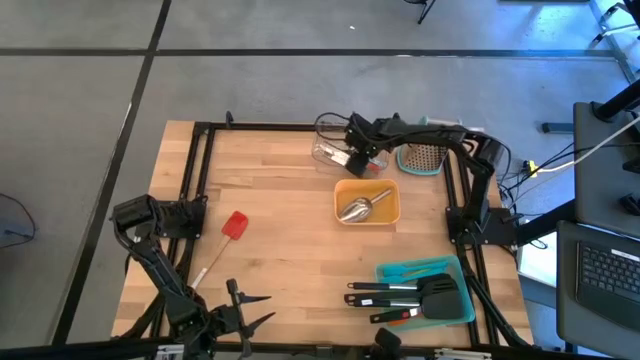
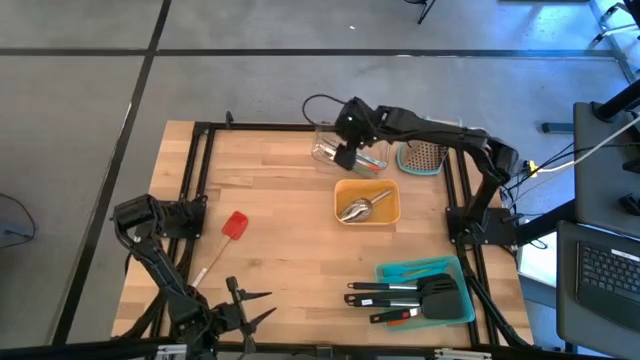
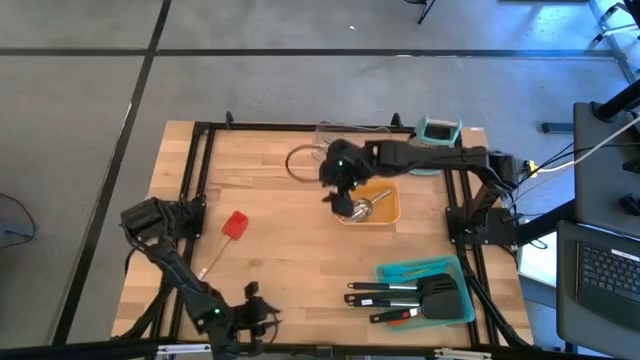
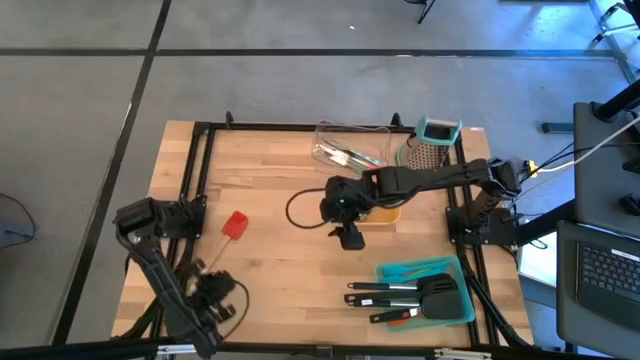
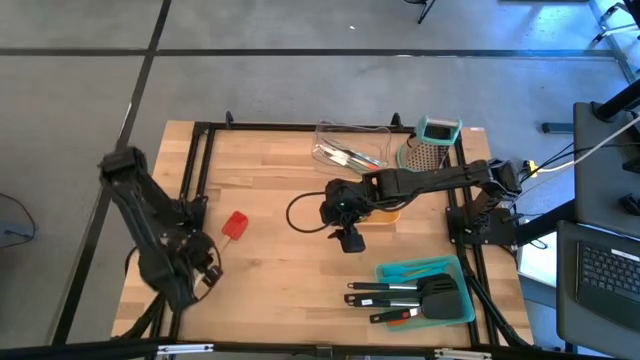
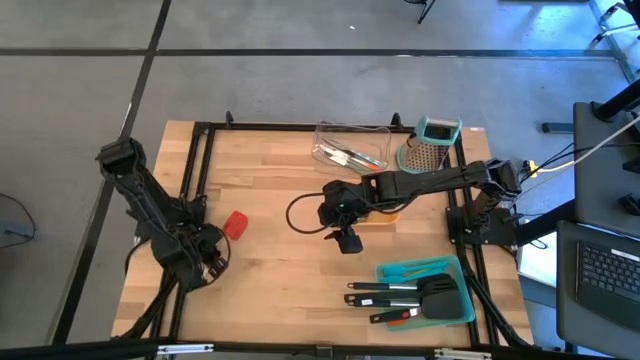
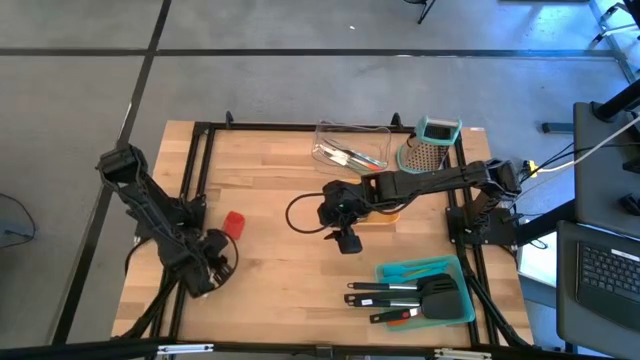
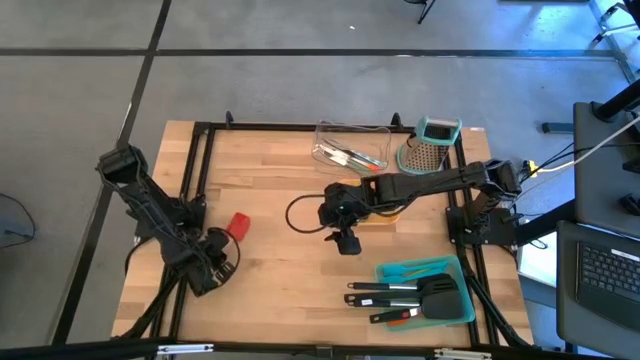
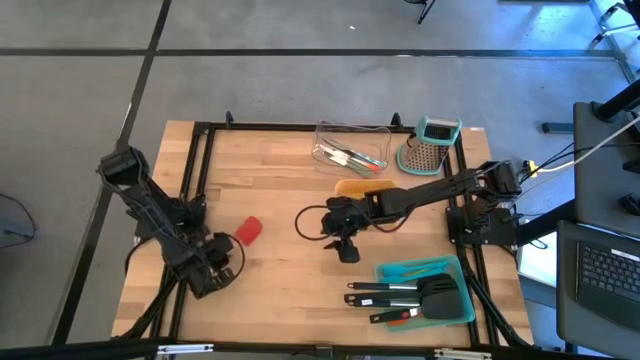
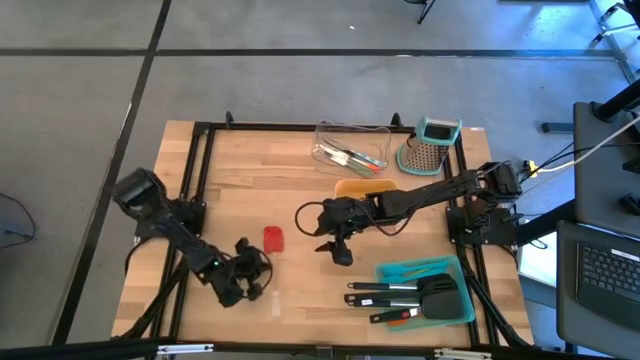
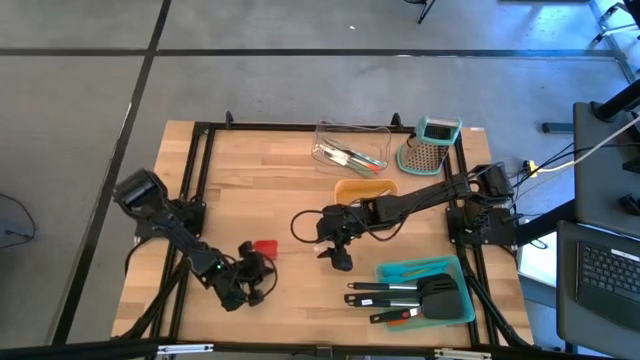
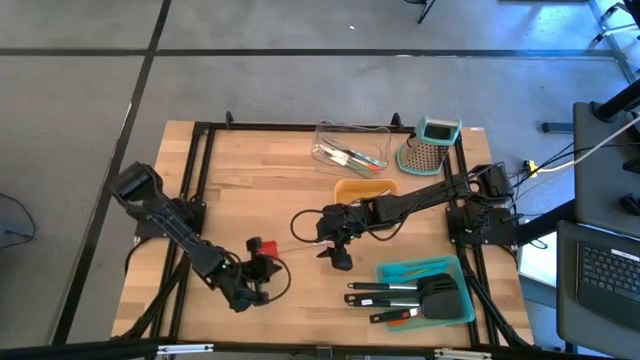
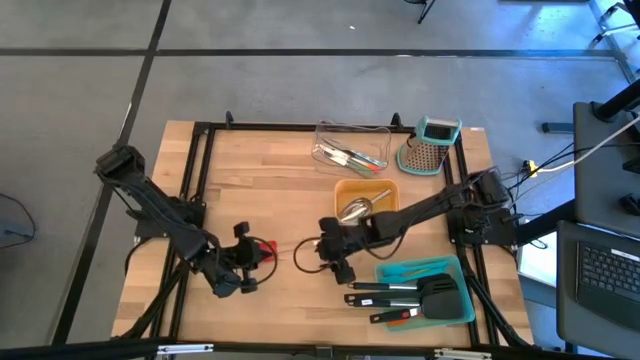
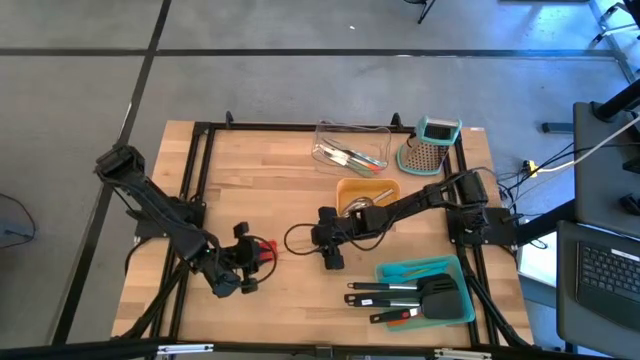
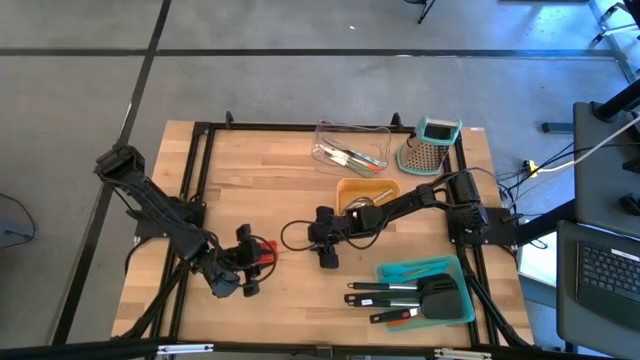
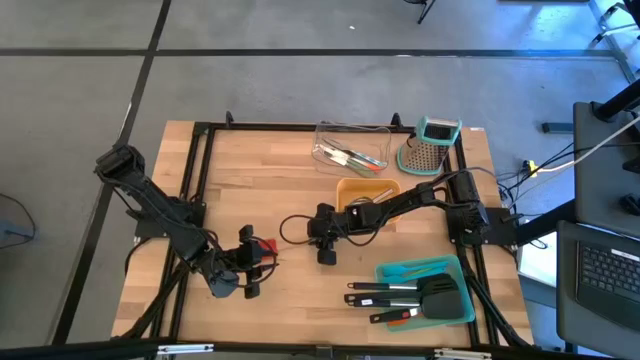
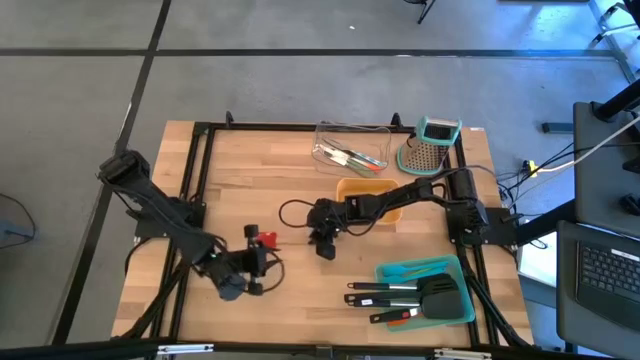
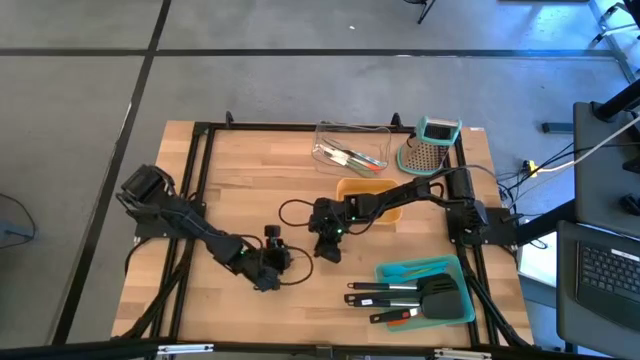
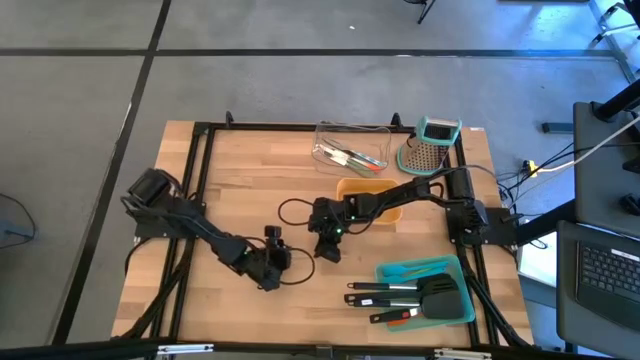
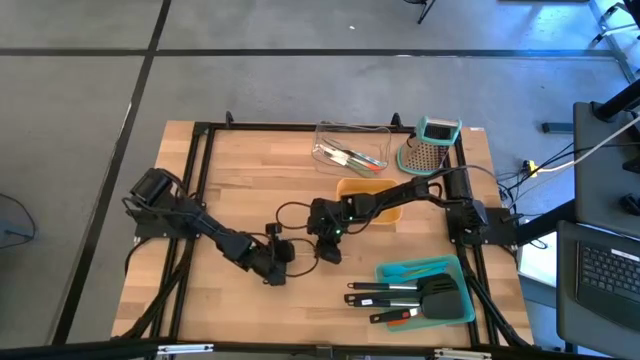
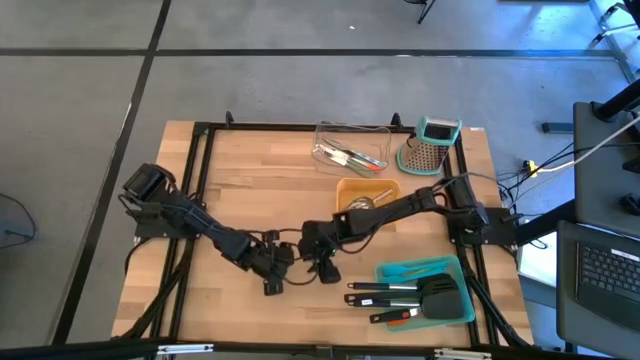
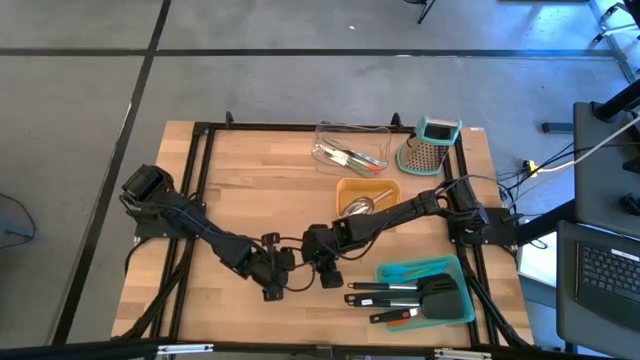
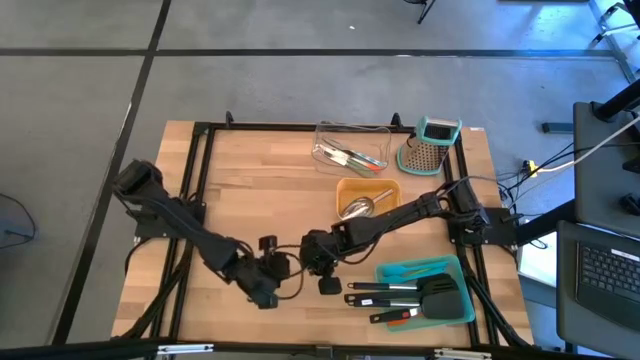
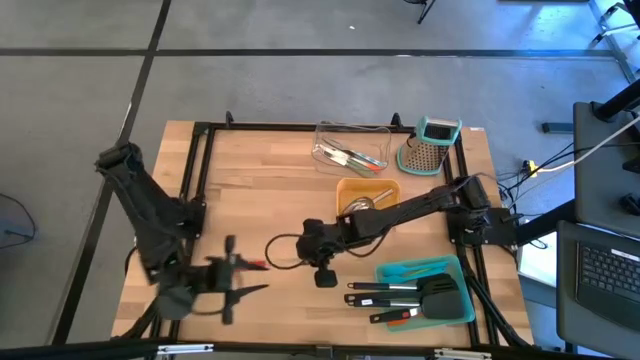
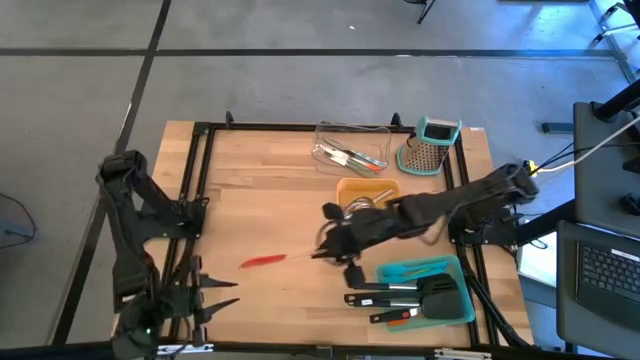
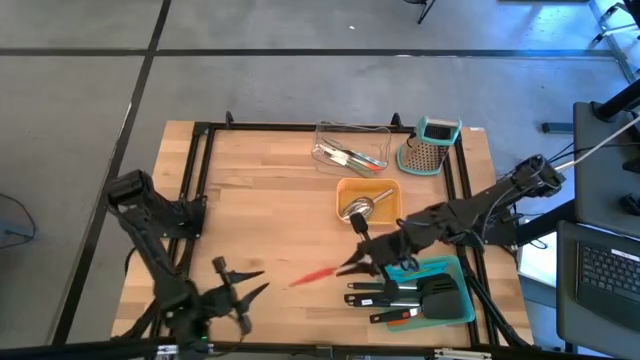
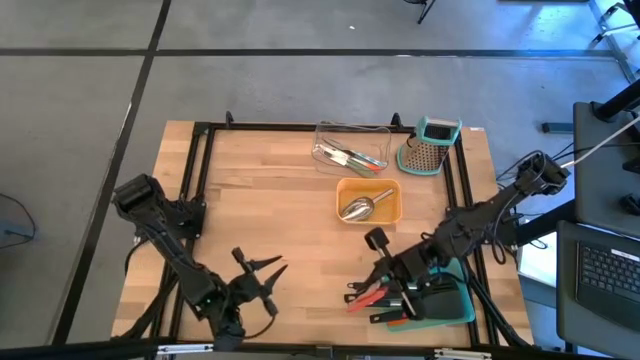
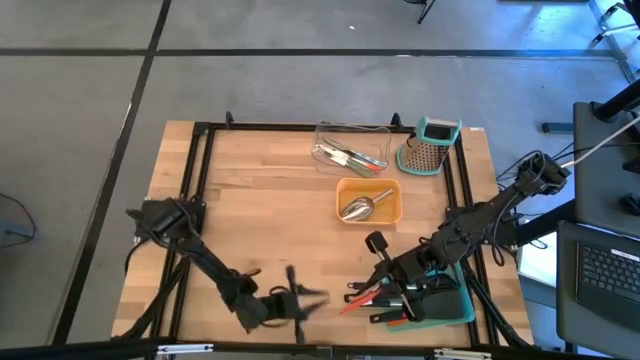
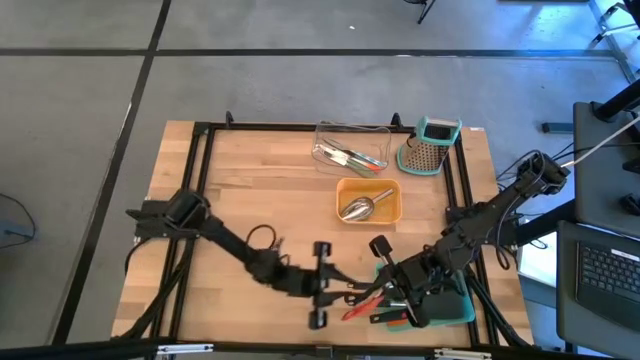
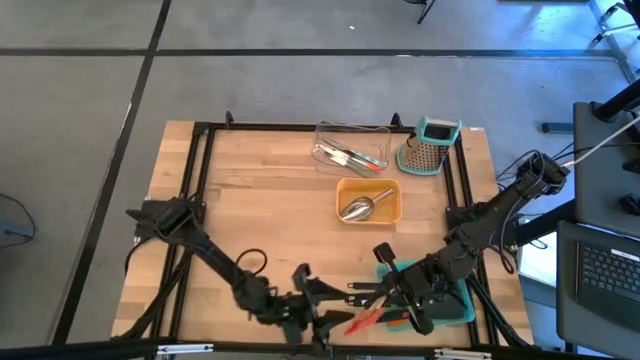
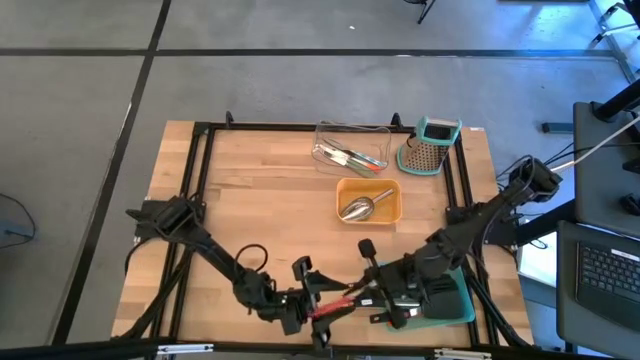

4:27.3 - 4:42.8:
Task: Pick & Place Kitchen Items
Put the red spatula into the green bin
